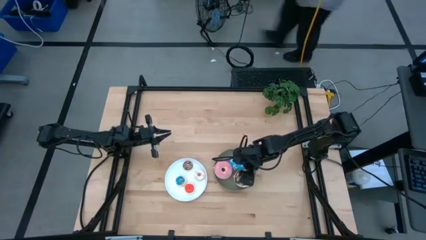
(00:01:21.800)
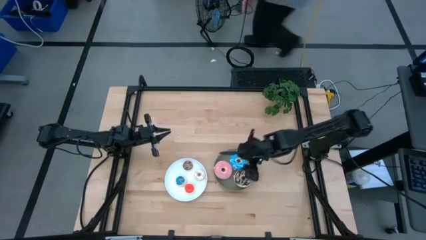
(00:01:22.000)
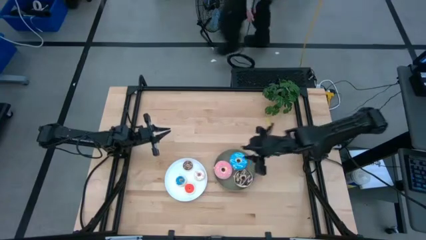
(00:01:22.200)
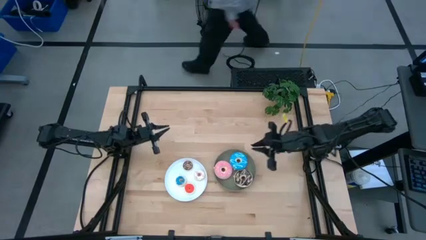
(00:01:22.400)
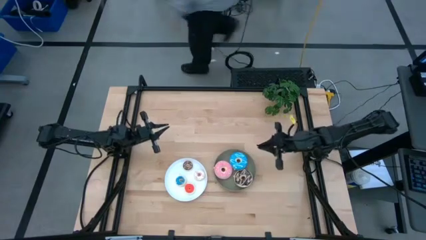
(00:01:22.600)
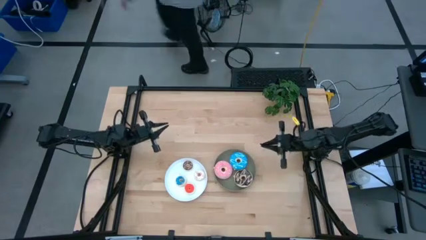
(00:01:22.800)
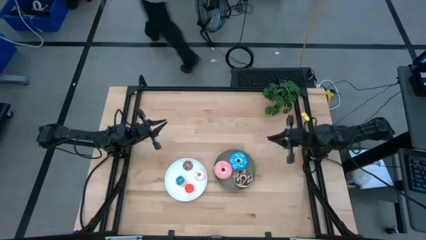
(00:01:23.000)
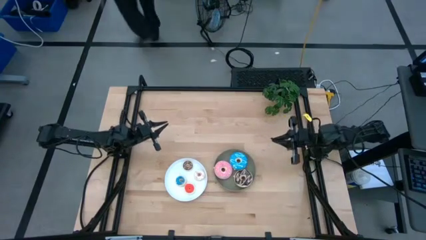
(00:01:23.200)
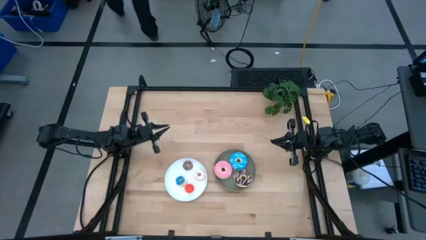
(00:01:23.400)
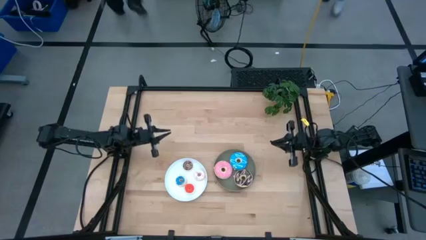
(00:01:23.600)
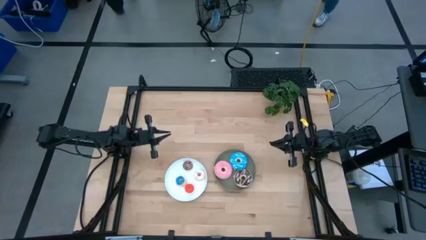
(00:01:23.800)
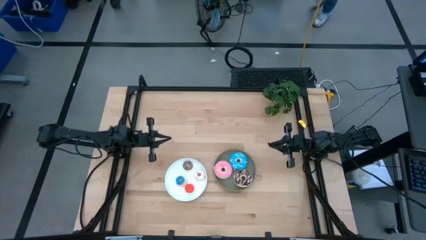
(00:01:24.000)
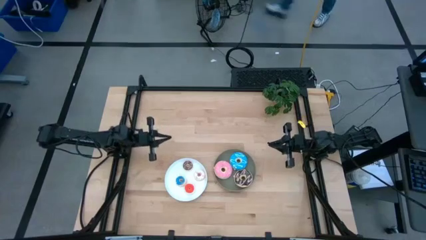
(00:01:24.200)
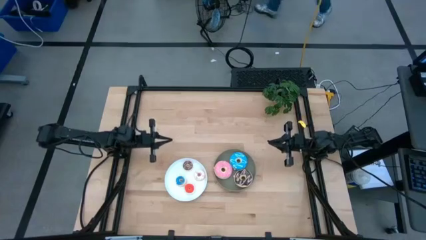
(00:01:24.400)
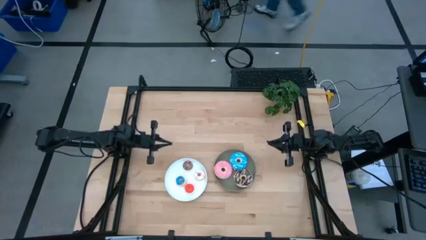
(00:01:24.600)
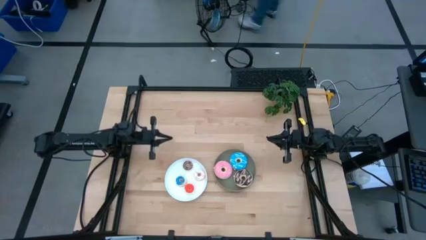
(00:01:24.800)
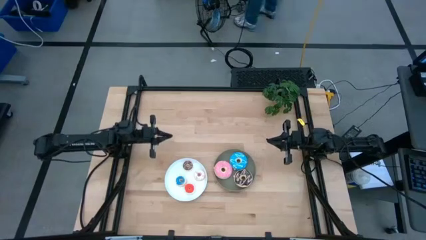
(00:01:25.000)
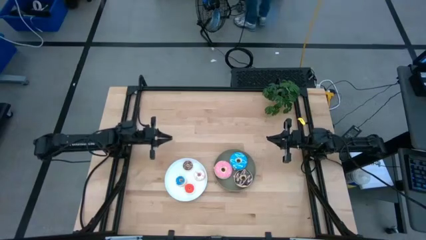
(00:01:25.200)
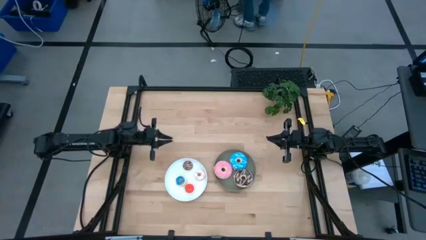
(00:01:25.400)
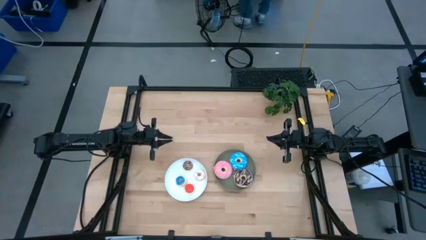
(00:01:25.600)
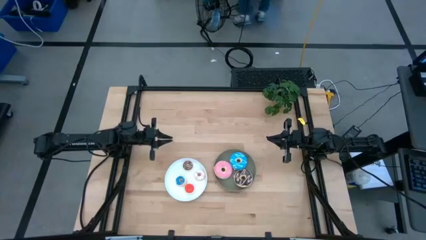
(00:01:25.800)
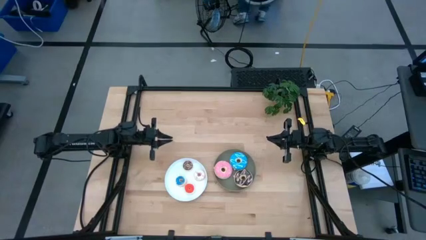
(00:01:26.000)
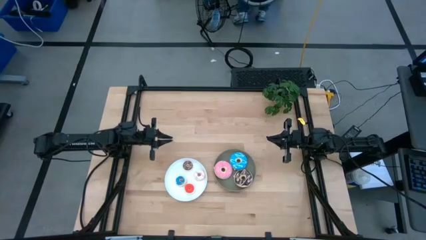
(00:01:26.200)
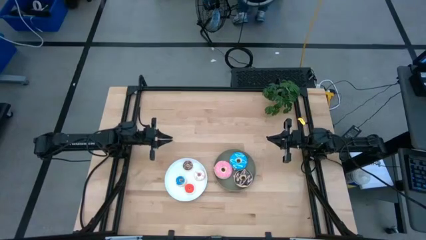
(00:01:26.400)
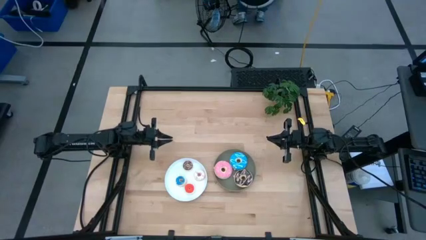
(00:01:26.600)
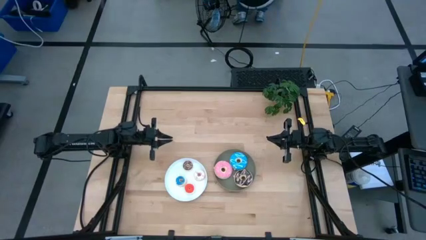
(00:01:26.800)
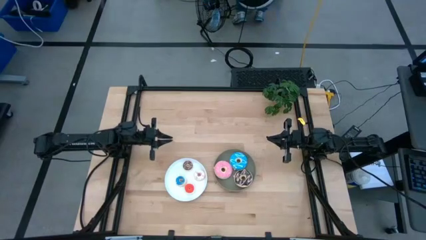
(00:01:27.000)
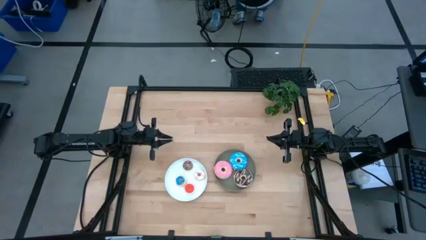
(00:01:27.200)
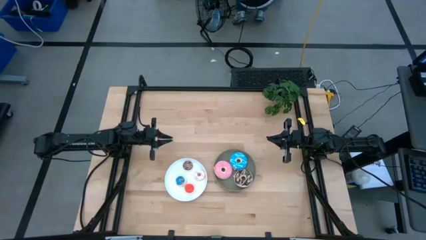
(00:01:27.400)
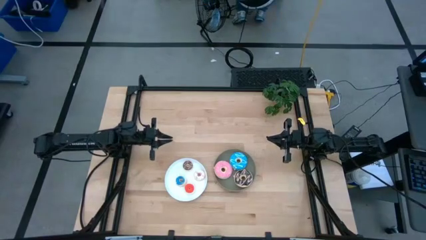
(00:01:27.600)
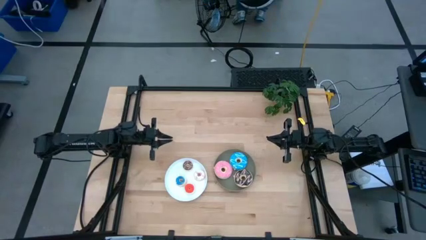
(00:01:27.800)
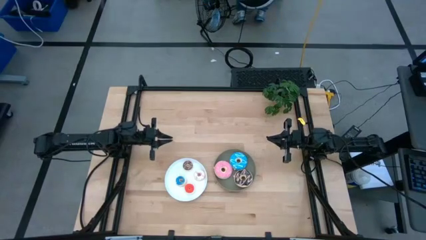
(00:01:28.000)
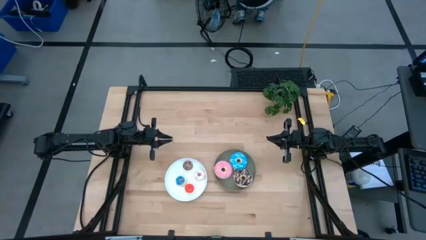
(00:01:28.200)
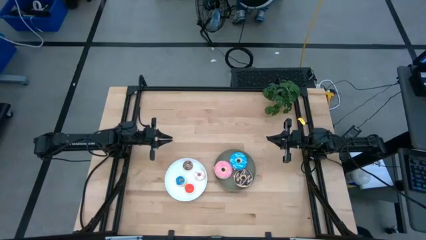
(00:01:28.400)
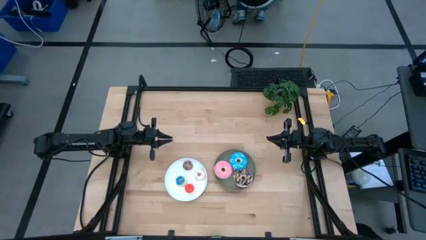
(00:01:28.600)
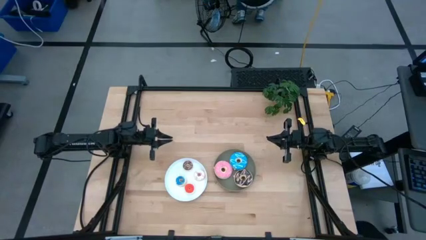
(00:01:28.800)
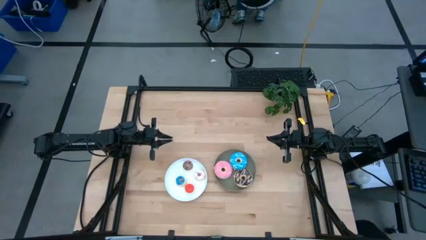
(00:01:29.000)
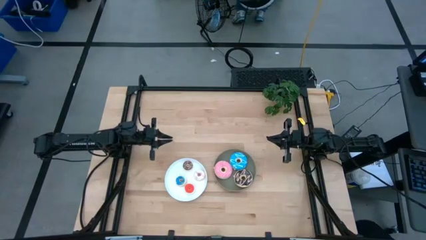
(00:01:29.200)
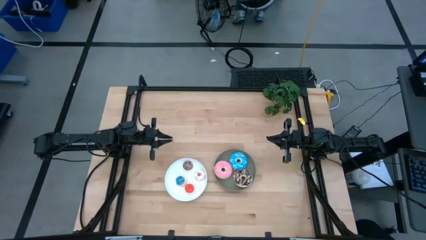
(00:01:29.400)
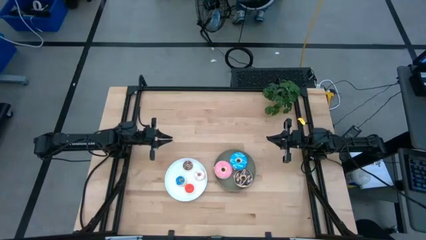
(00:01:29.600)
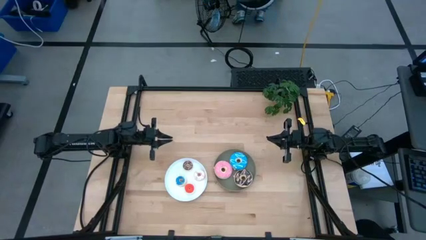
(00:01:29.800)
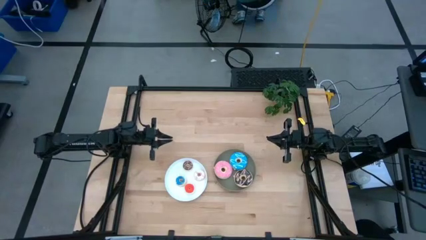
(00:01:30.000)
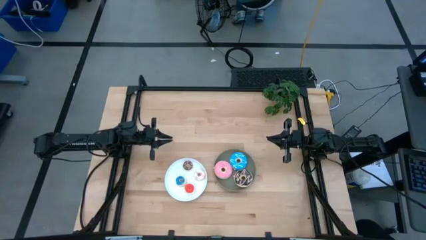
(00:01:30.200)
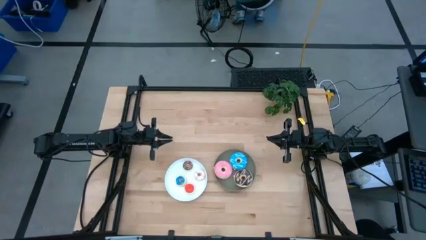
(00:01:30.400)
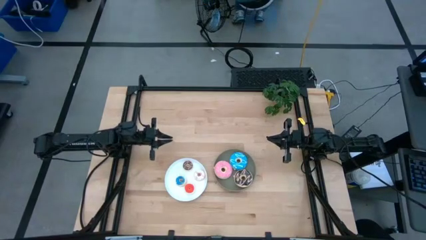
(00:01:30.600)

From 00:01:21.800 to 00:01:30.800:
Task: Pick & Place donuts
Return to Home Position

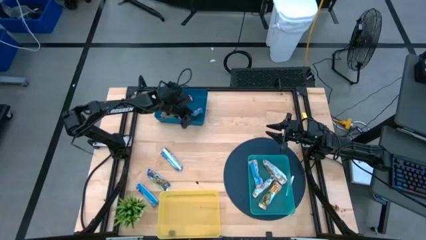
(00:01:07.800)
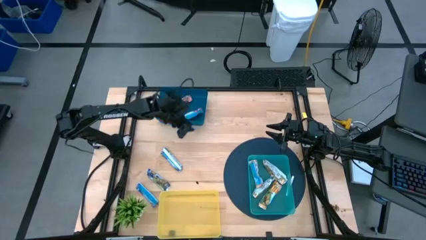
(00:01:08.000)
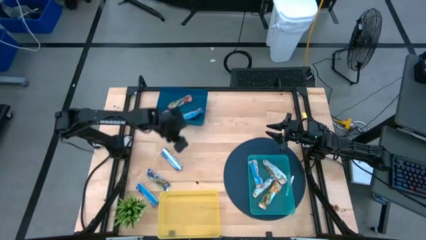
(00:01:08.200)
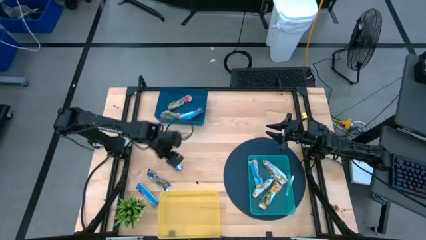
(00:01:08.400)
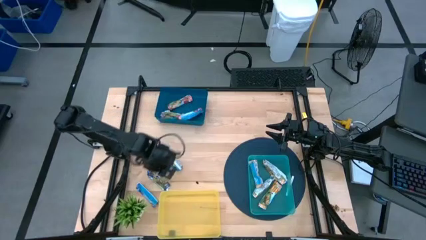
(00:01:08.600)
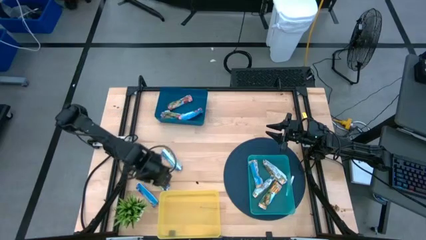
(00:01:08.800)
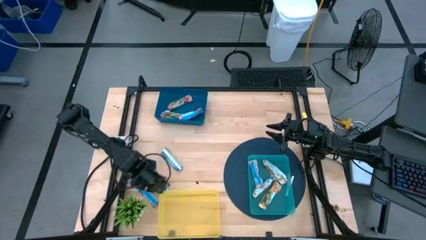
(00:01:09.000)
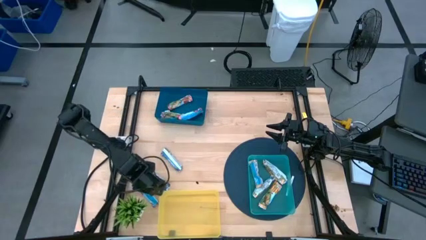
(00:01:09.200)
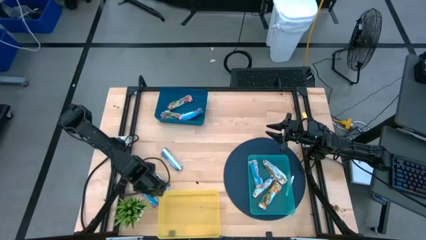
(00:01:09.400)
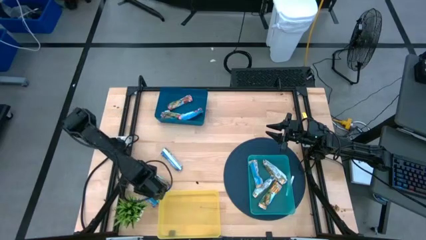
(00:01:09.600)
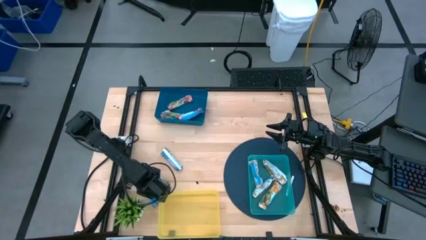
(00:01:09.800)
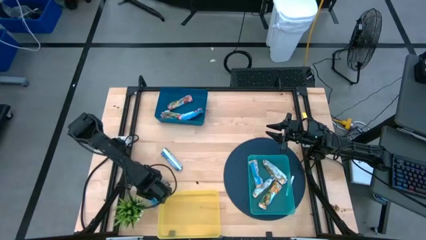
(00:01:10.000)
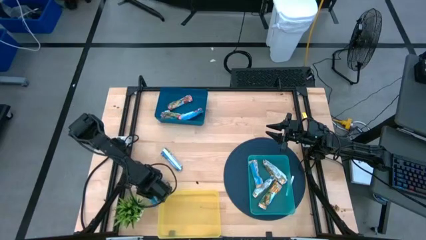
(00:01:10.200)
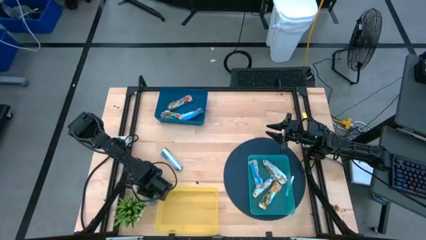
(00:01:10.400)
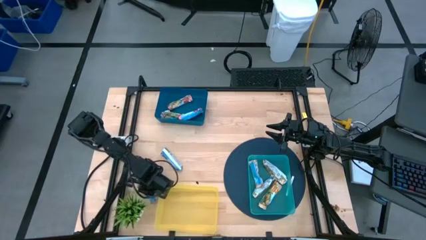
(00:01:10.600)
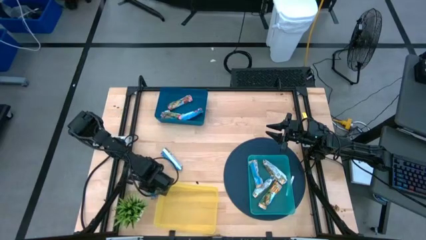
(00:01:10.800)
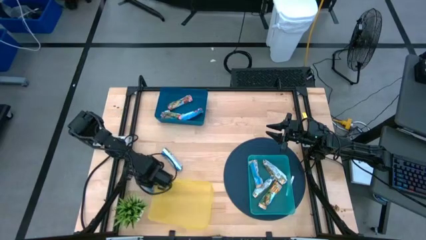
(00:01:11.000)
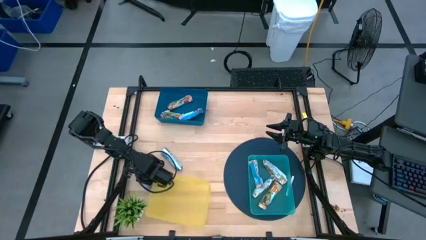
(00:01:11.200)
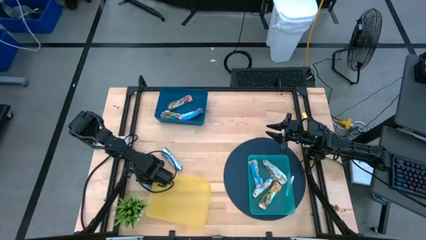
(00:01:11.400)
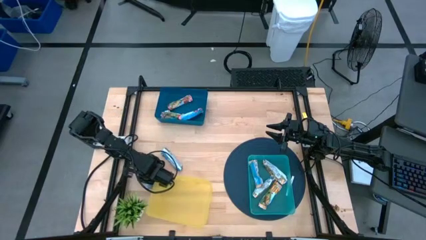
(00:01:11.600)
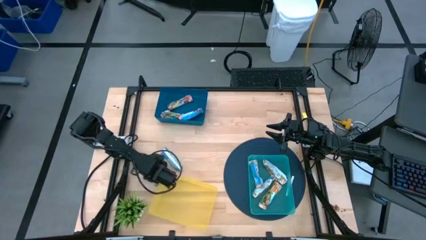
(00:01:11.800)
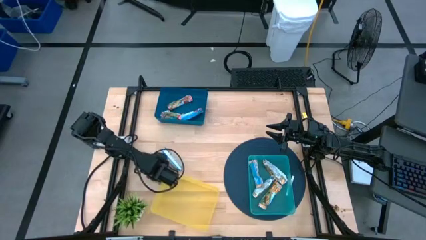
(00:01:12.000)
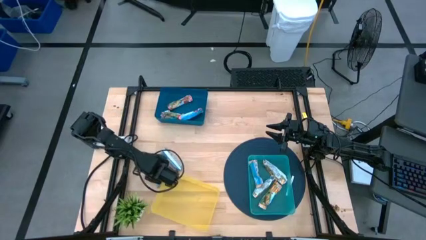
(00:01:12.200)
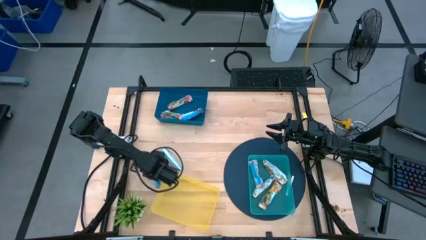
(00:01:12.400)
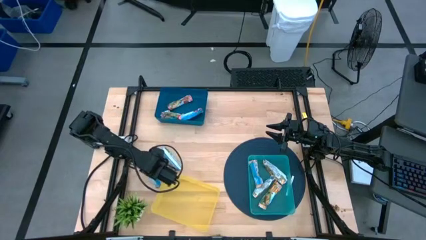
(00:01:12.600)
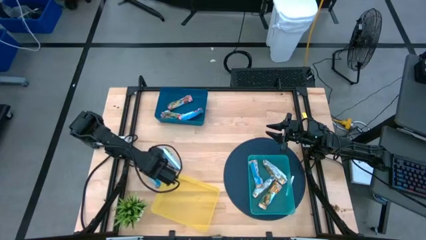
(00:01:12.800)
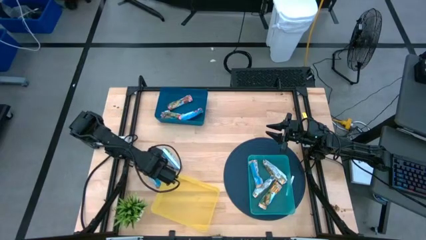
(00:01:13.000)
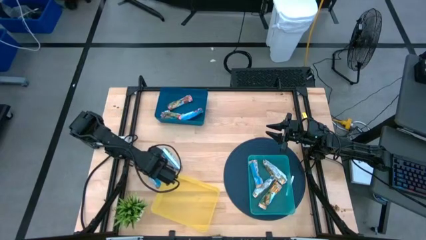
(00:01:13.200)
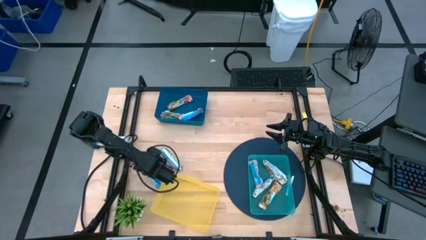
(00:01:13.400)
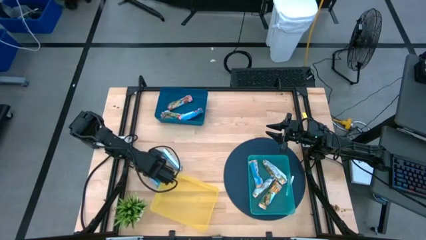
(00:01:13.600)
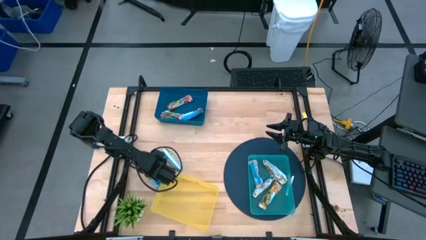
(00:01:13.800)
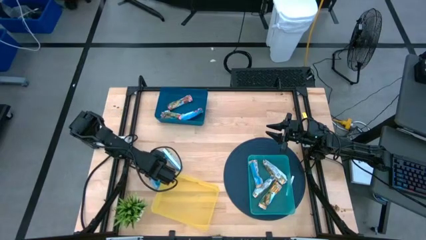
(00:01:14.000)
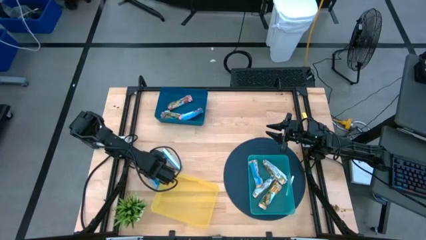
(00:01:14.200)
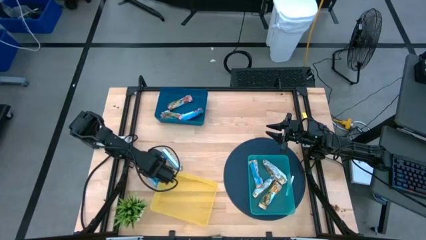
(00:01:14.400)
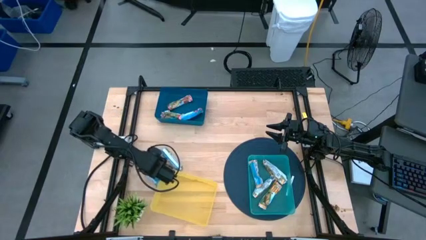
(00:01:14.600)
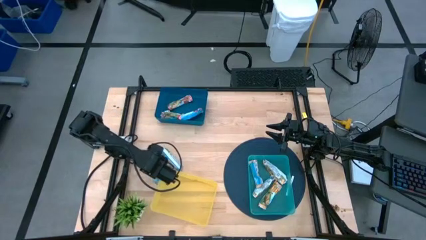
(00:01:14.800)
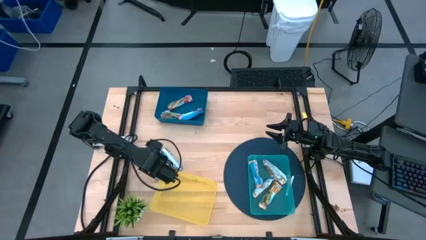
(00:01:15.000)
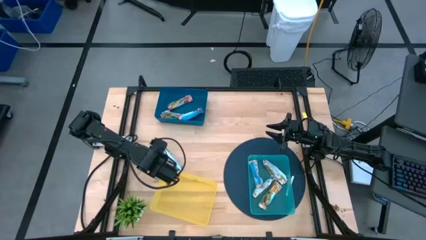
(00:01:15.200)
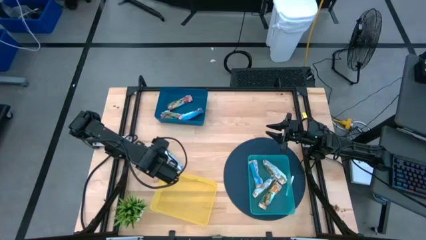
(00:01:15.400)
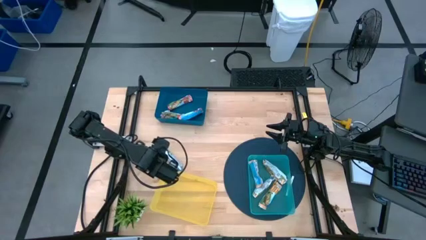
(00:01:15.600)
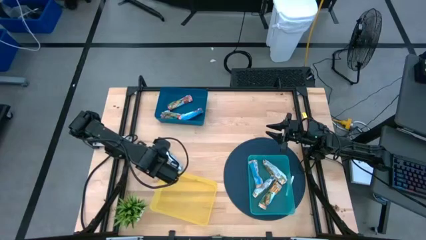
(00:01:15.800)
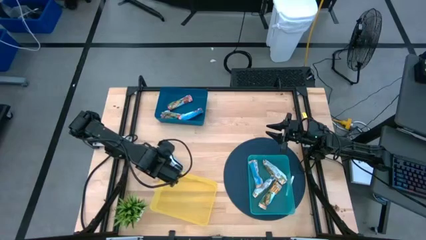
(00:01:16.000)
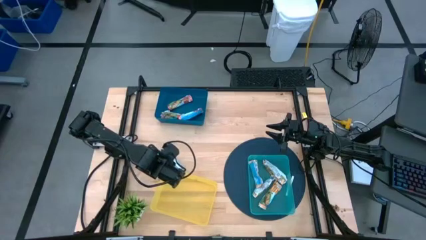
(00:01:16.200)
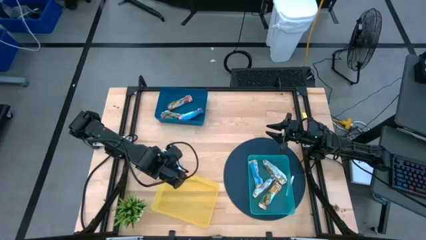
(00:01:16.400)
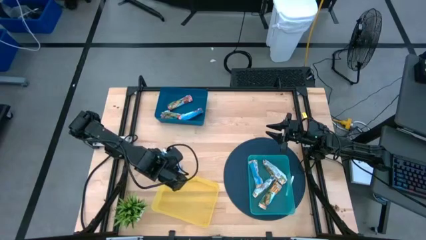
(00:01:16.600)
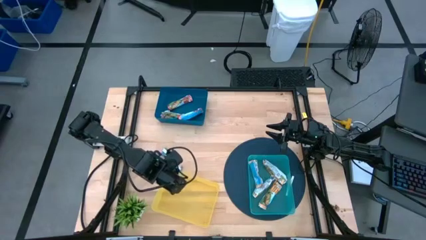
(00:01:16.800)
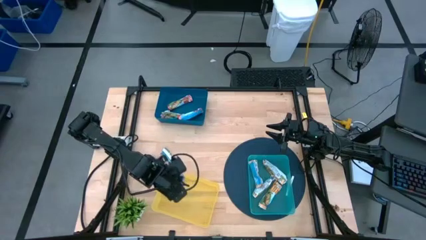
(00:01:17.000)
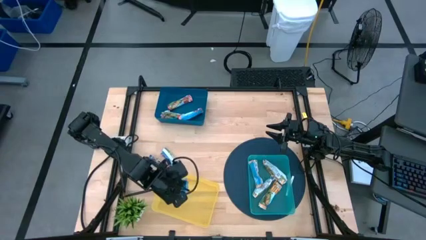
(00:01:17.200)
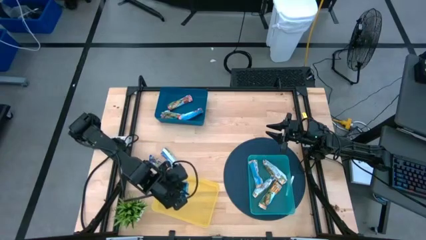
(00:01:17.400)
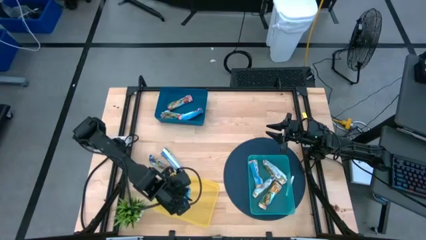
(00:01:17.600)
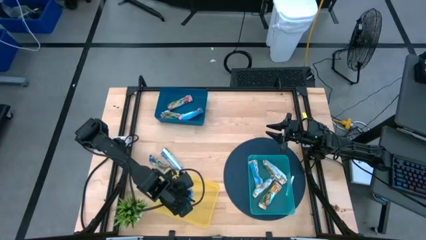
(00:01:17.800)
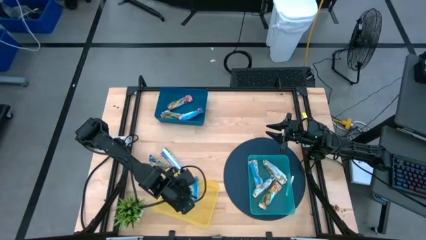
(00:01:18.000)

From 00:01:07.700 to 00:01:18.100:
Task: Pick and place Granola Bars by type
Put the bottom blue granola bar into the yellow bin
